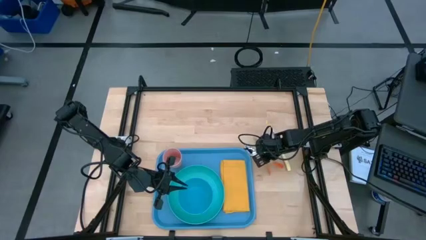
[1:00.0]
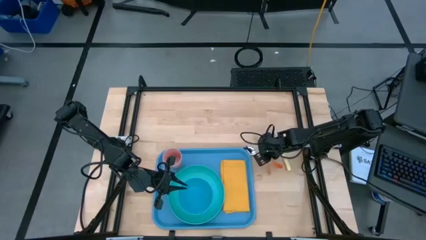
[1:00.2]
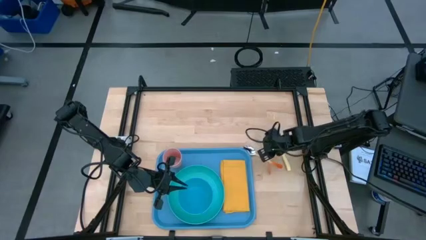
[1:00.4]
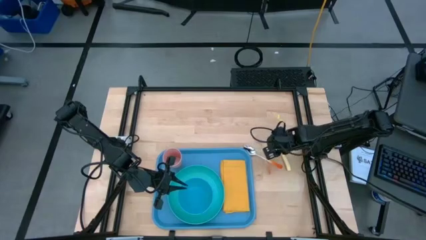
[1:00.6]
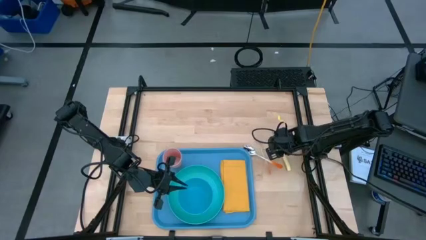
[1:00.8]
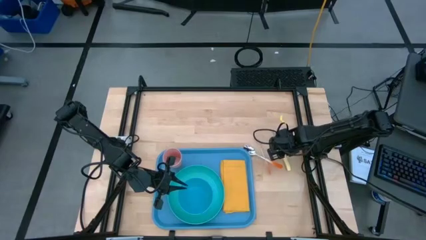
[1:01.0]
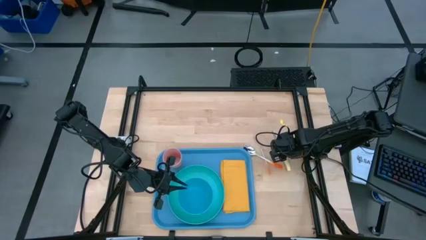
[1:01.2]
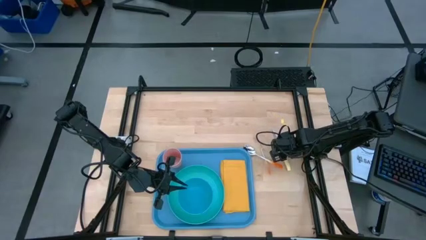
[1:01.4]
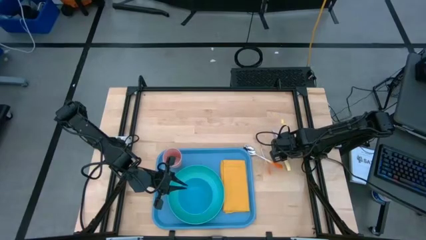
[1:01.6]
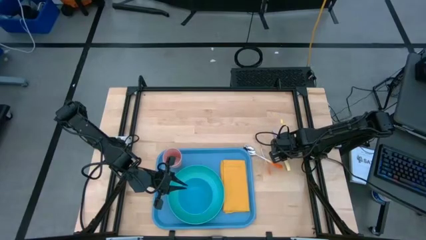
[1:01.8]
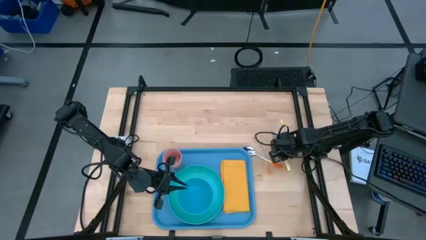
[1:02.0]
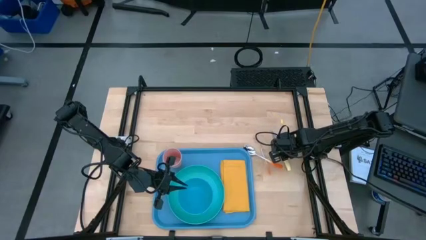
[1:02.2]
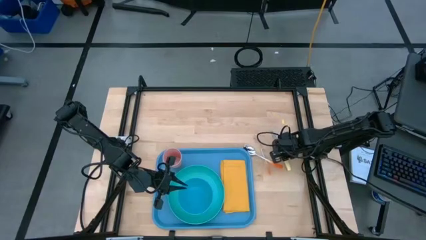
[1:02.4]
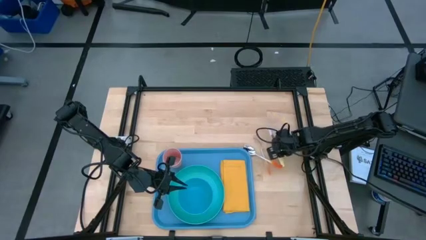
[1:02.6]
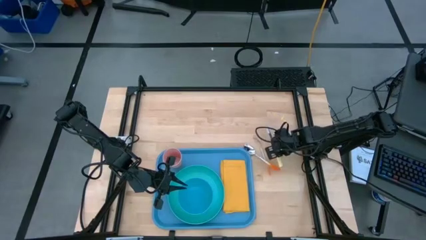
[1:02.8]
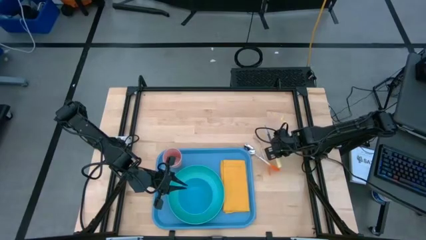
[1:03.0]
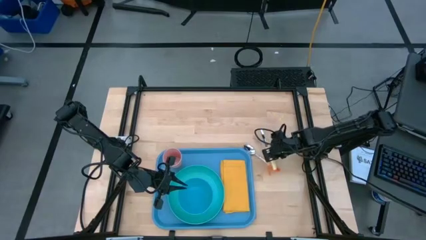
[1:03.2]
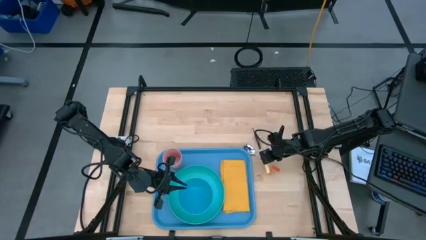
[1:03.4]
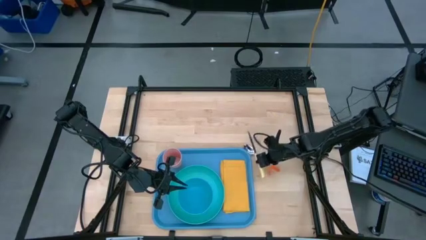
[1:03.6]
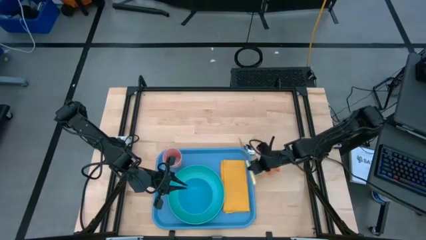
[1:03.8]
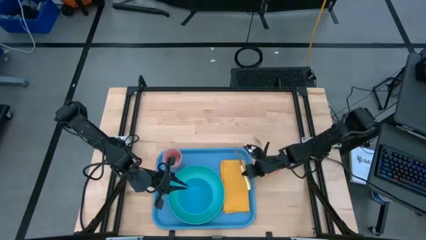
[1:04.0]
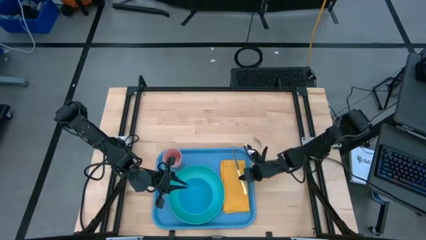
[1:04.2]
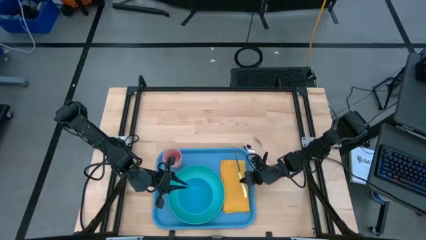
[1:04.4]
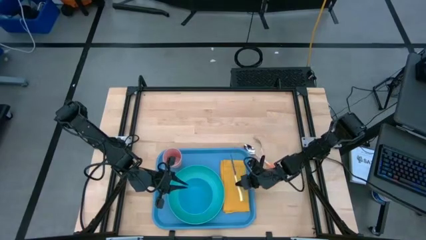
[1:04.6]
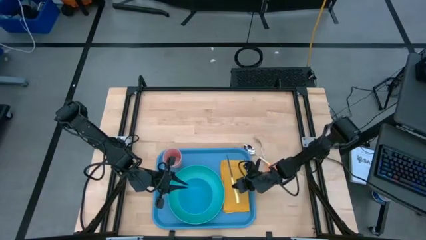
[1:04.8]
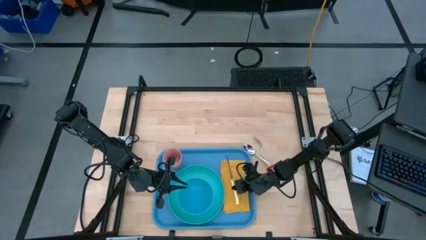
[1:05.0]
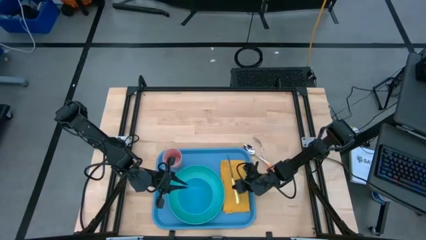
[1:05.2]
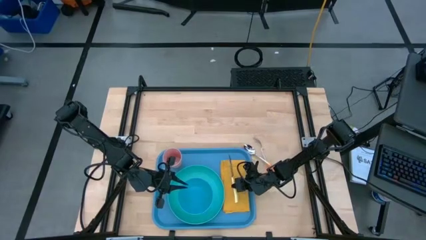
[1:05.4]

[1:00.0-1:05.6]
Task: Set up tray
Put the knife on the napkin

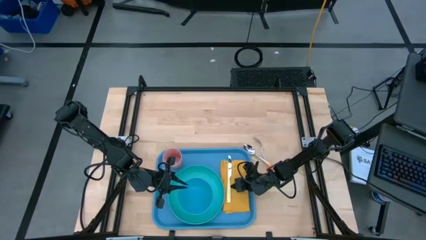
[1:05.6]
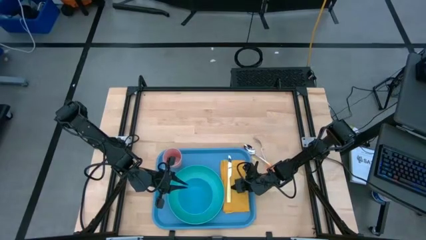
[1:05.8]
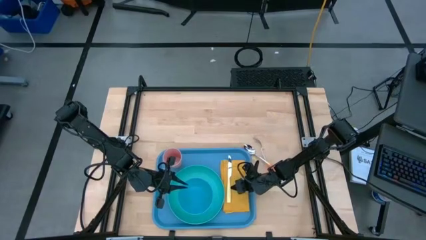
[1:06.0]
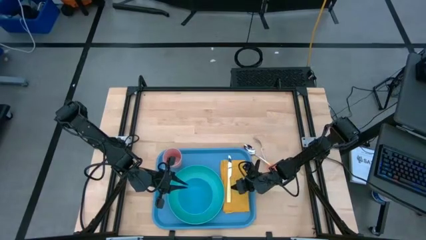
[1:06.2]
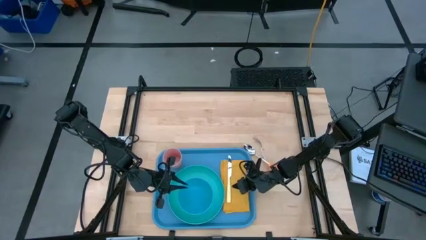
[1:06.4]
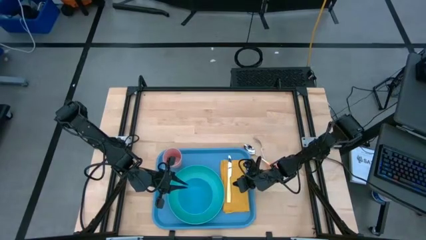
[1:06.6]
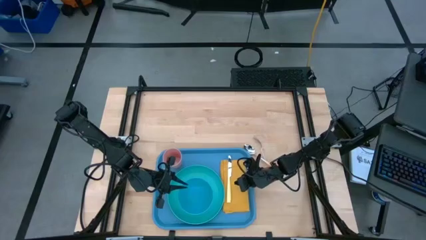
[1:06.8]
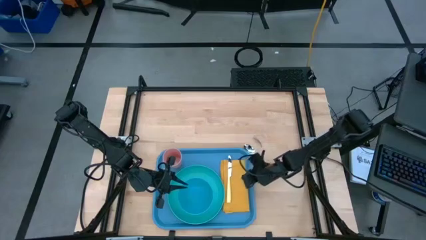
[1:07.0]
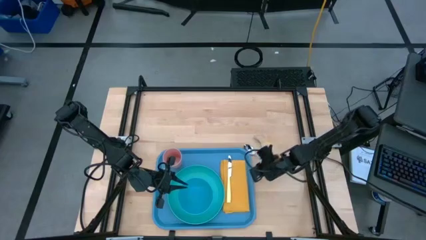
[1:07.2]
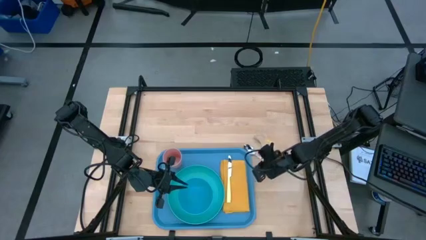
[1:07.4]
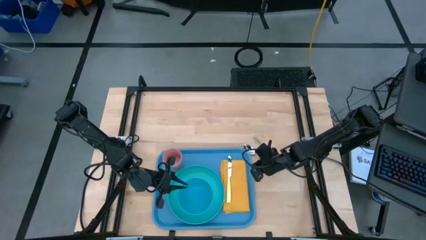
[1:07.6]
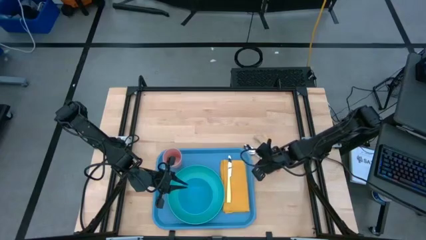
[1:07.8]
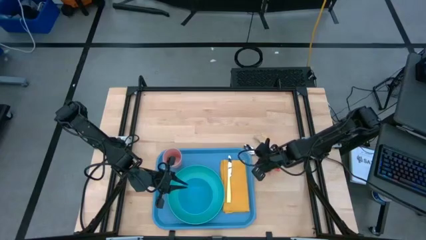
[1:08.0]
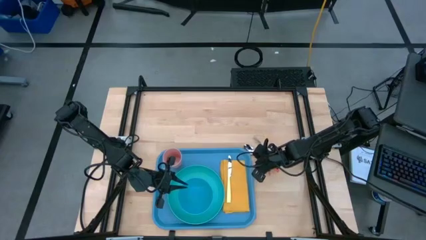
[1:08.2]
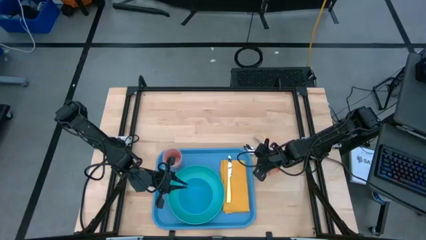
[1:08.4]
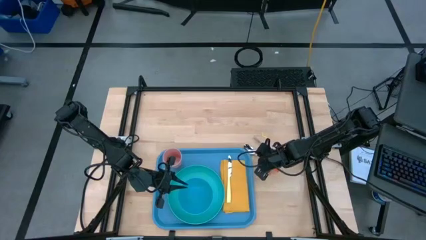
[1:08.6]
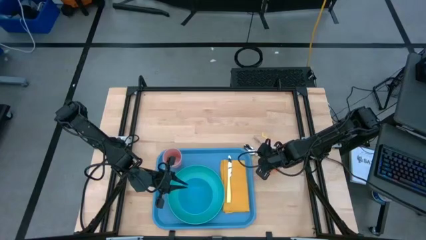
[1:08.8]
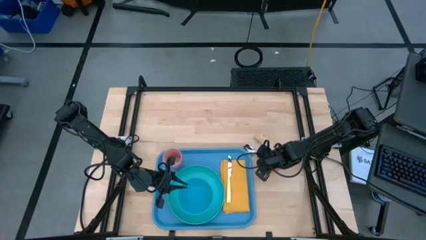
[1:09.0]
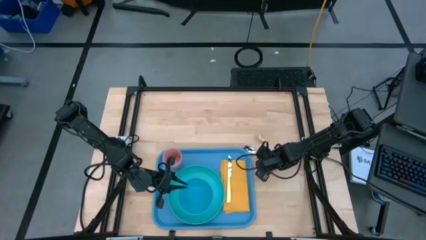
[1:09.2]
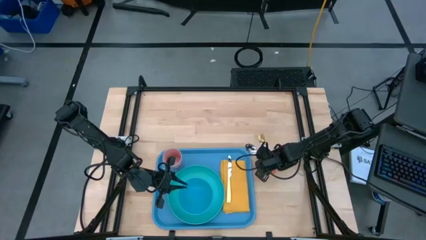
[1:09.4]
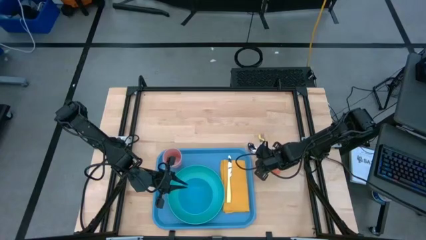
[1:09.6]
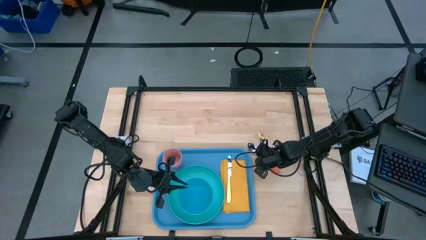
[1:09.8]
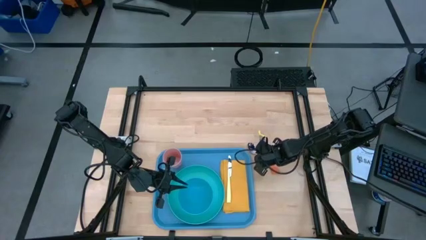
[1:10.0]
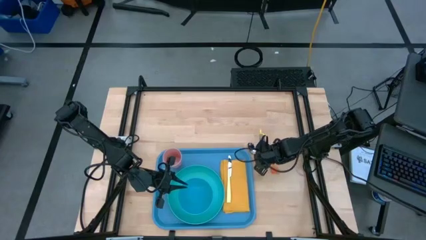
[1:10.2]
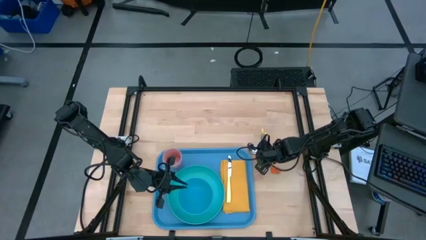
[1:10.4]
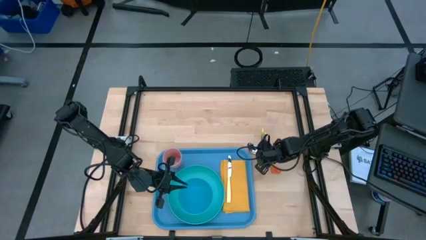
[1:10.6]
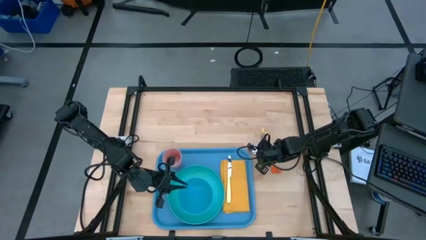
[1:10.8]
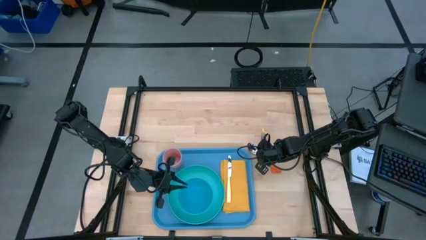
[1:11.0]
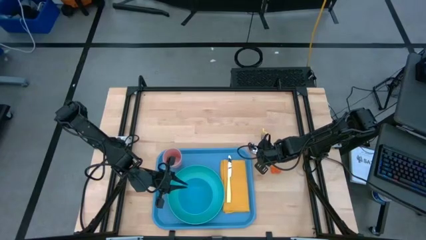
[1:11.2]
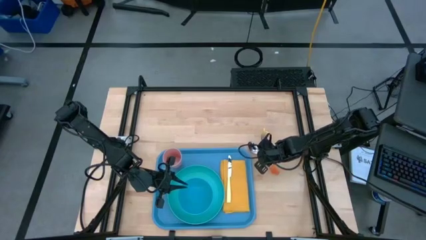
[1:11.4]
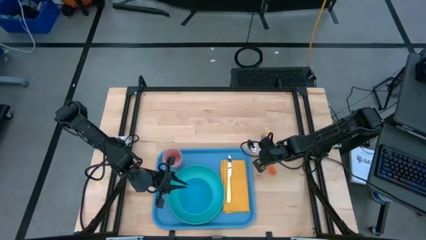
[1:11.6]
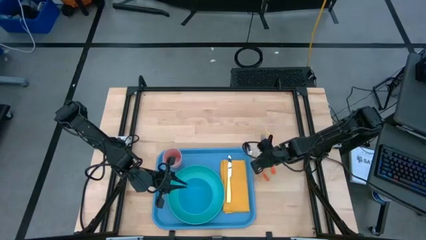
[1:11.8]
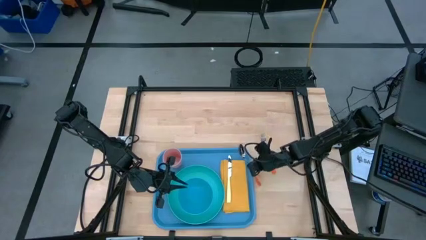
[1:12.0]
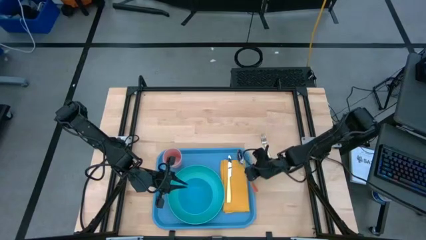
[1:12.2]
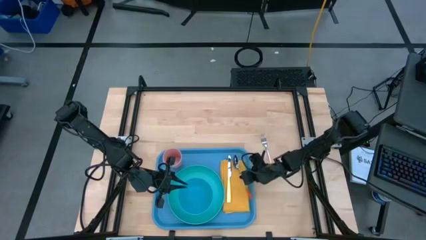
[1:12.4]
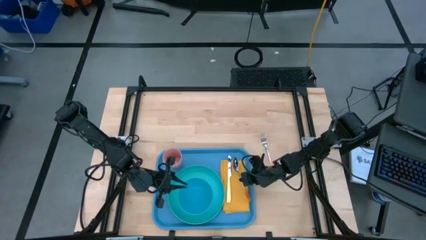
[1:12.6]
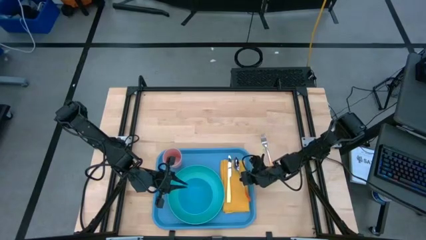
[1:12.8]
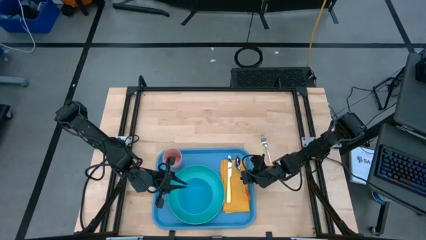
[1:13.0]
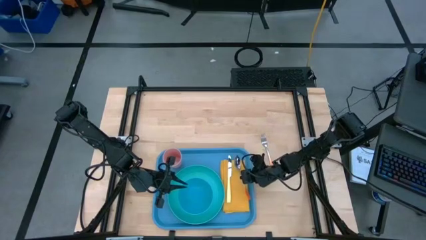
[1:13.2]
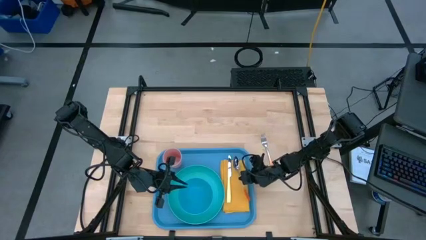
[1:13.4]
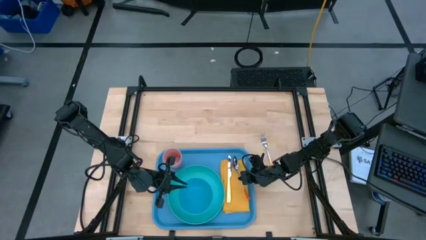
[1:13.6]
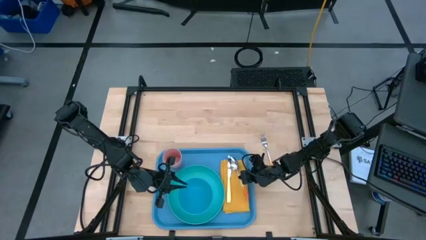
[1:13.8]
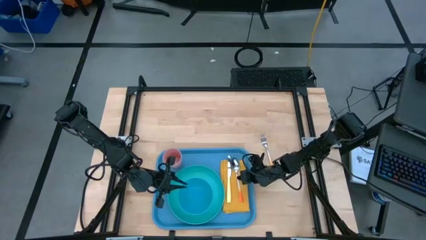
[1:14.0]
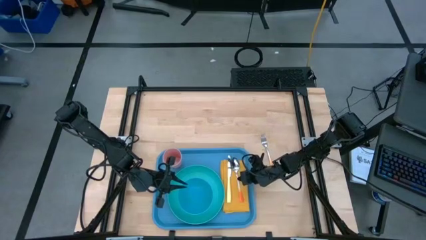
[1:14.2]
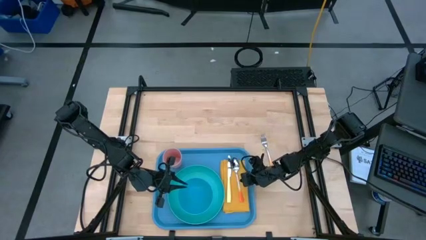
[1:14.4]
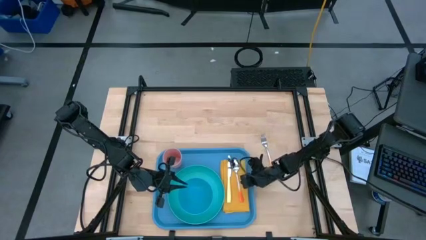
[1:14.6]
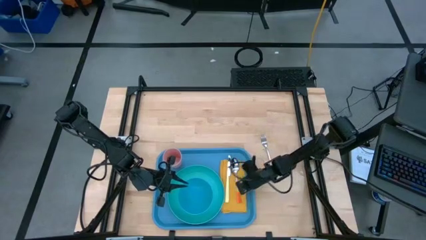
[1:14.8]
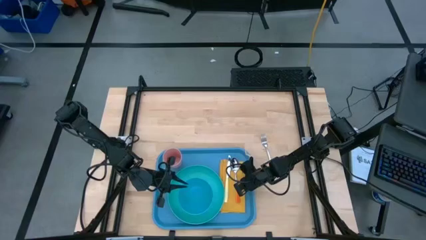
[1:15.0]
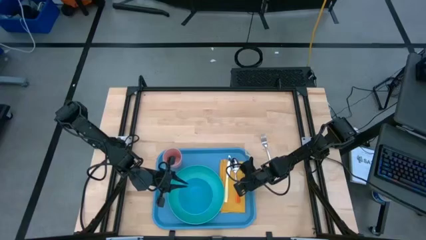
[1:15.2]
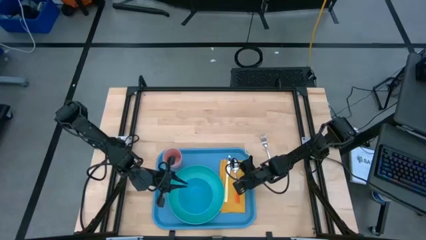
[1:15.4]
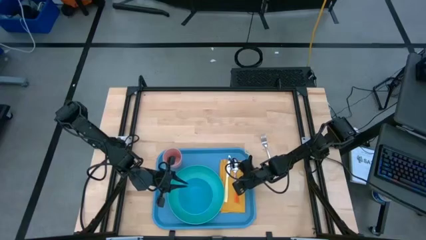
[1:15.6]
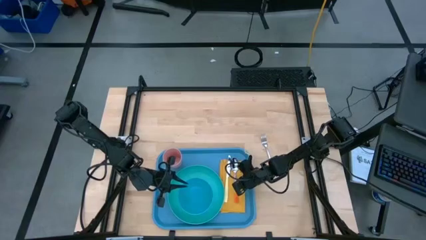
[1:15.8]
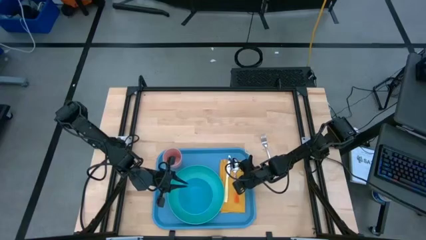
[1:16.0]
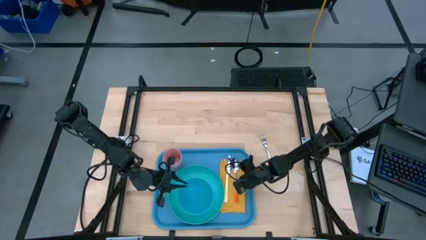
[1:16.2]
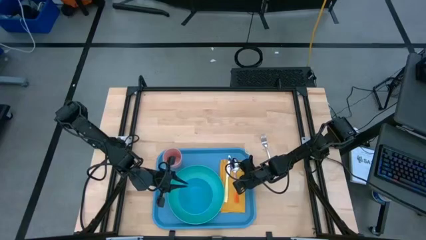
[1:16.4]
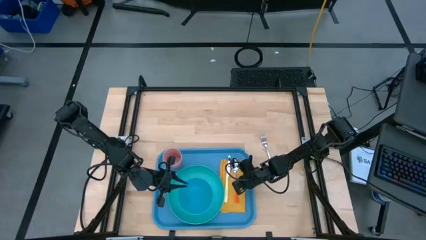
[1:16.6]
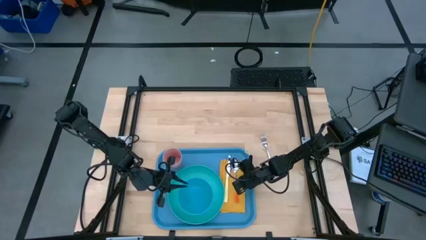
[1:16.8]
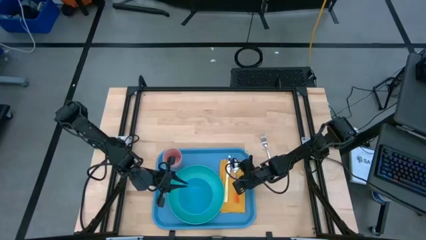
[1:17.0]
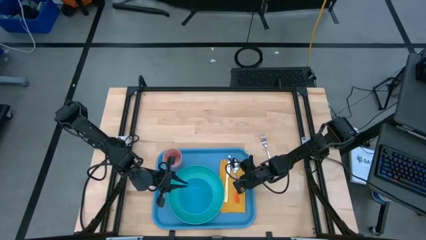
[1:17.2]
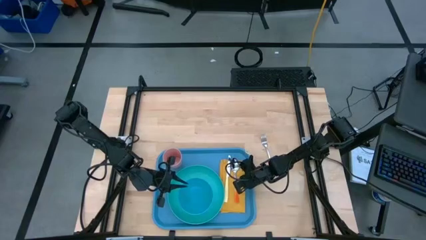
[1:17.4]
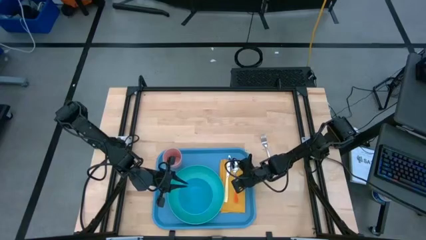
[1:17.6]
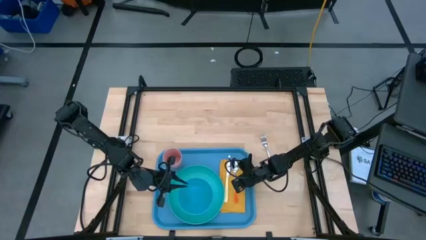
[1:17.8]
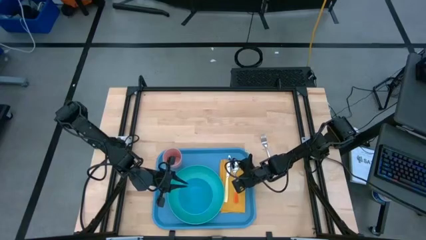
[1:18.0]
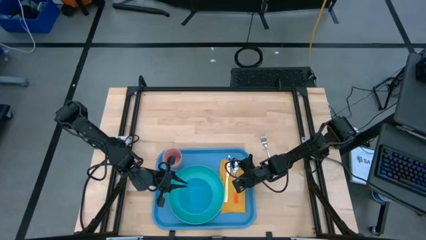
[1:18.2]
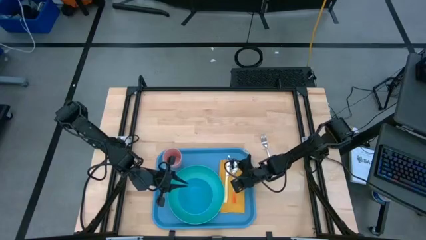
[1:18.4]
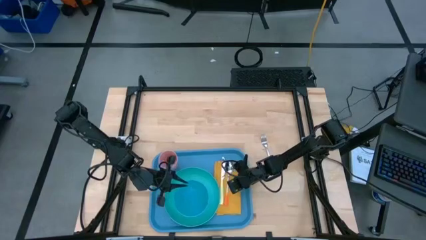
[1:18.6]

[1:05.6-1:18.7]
Put the spoon to the right of the knife on the napkin
